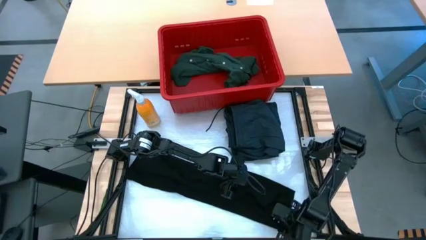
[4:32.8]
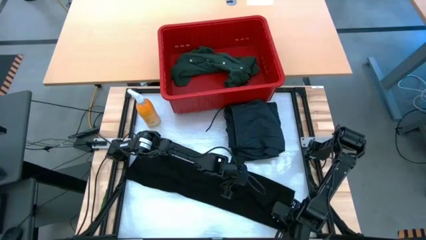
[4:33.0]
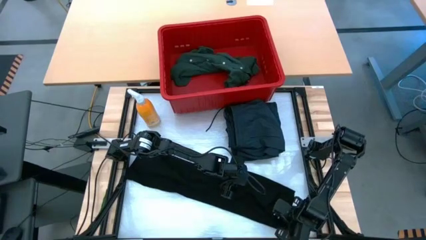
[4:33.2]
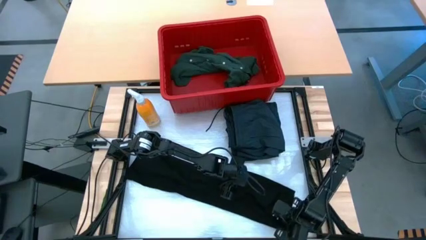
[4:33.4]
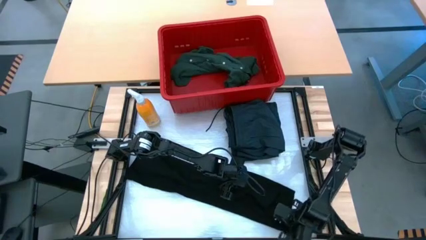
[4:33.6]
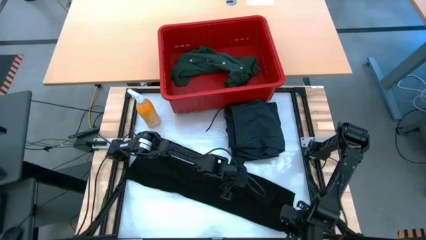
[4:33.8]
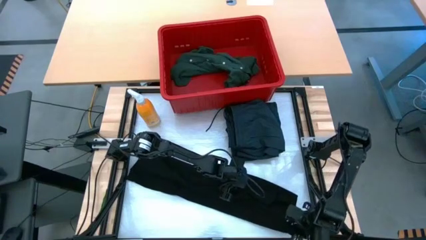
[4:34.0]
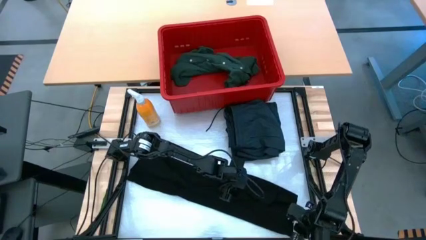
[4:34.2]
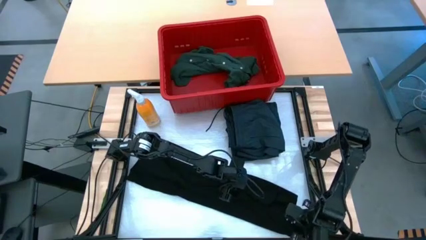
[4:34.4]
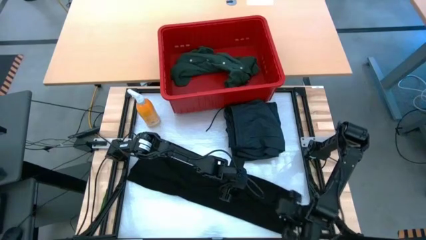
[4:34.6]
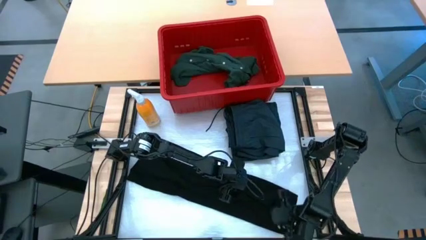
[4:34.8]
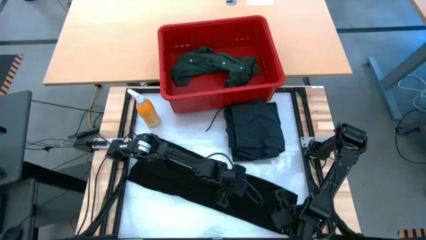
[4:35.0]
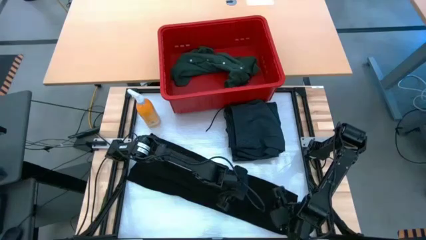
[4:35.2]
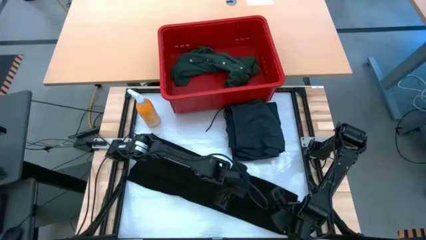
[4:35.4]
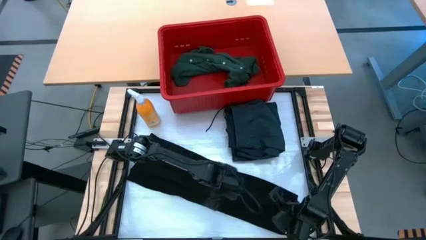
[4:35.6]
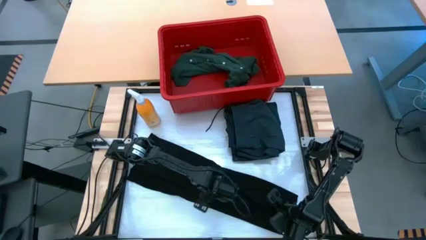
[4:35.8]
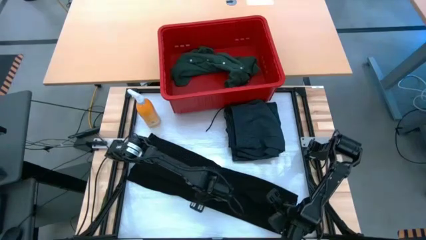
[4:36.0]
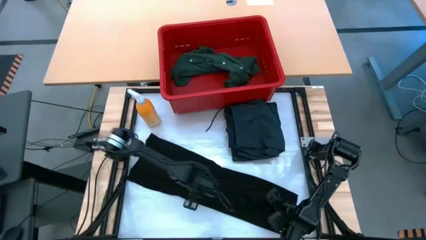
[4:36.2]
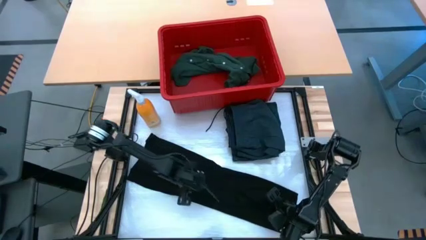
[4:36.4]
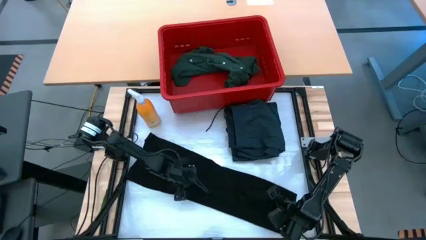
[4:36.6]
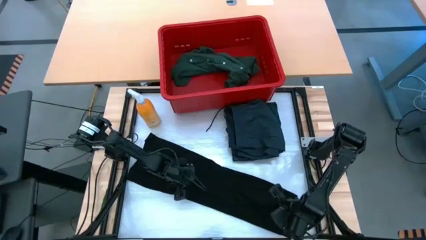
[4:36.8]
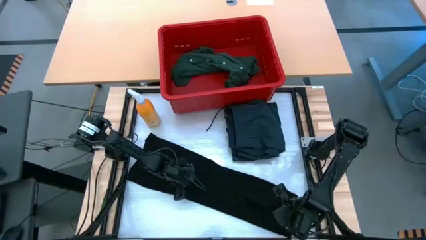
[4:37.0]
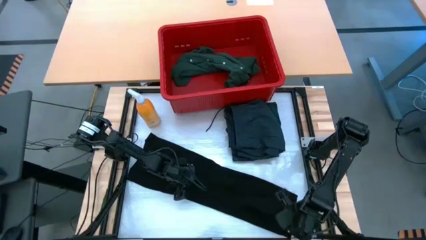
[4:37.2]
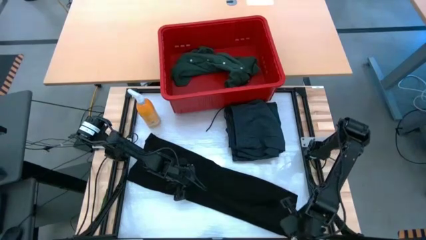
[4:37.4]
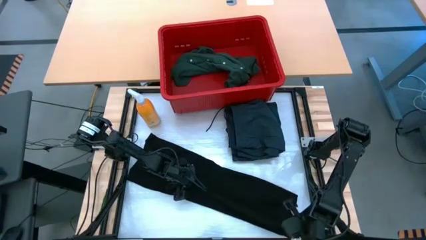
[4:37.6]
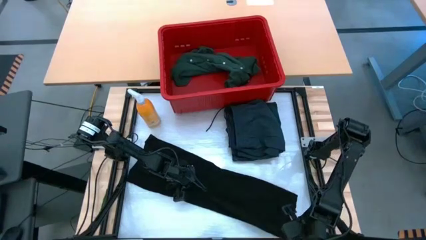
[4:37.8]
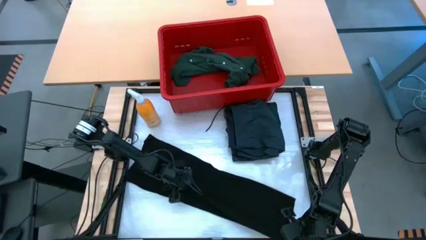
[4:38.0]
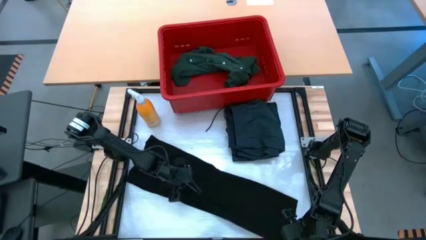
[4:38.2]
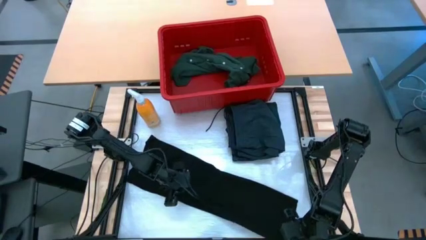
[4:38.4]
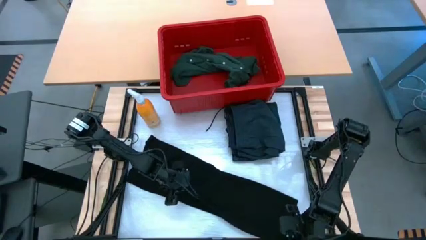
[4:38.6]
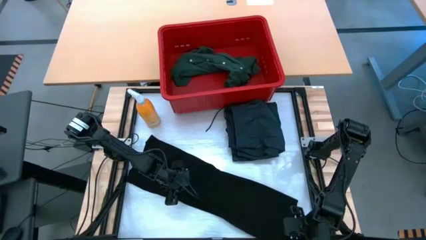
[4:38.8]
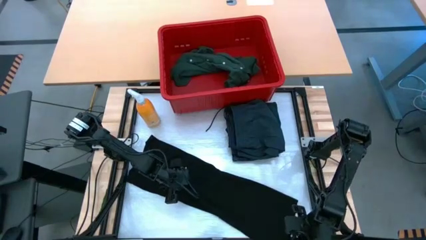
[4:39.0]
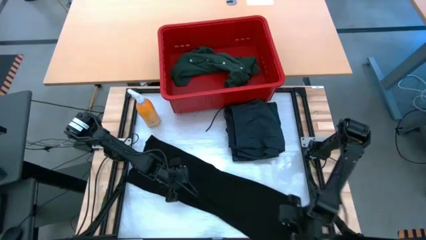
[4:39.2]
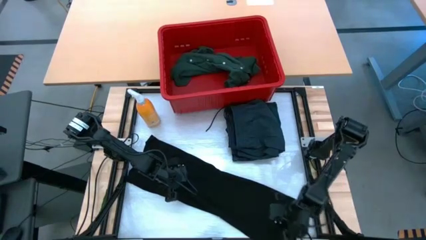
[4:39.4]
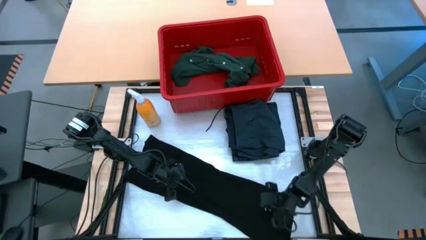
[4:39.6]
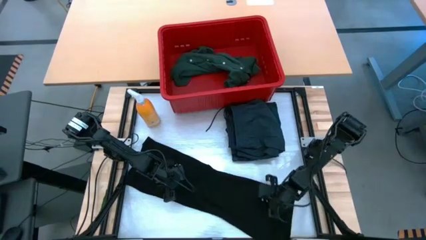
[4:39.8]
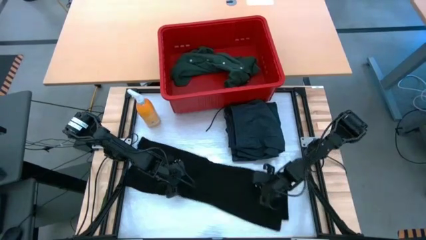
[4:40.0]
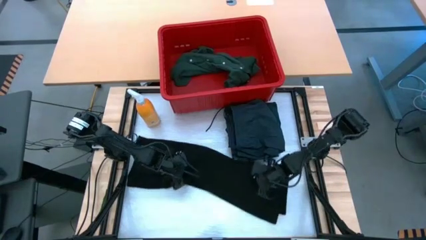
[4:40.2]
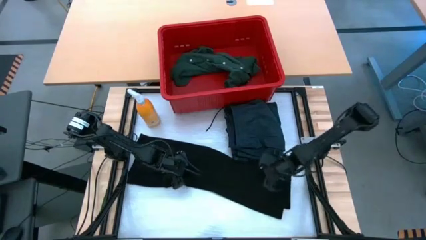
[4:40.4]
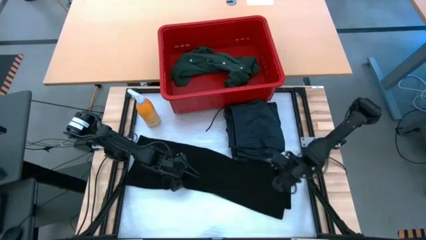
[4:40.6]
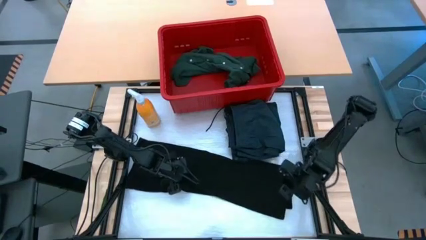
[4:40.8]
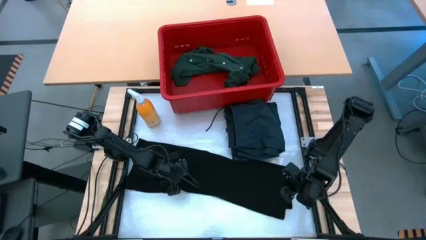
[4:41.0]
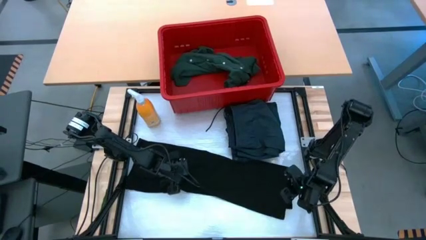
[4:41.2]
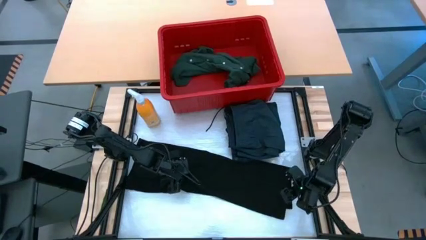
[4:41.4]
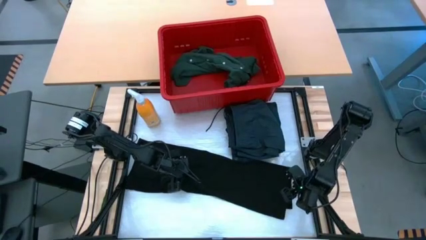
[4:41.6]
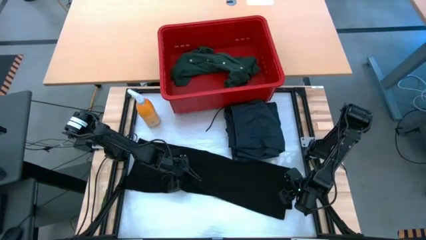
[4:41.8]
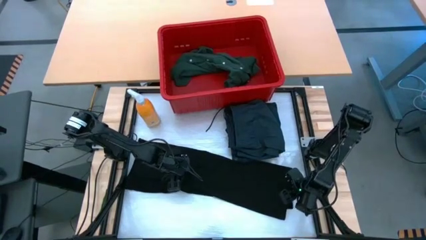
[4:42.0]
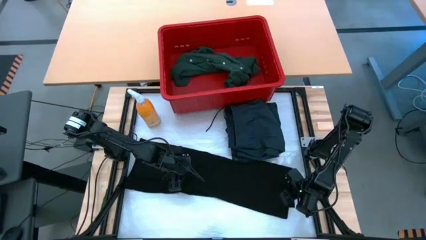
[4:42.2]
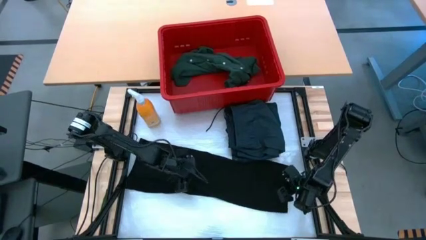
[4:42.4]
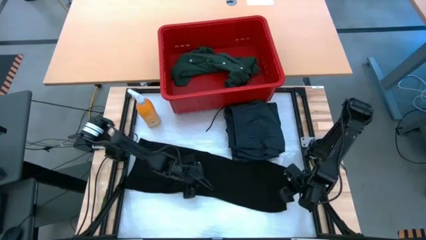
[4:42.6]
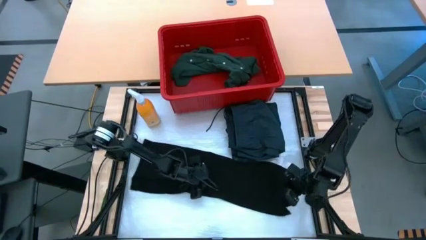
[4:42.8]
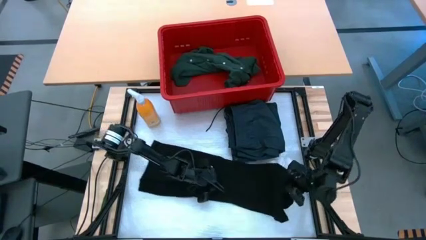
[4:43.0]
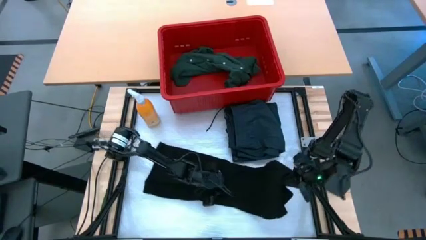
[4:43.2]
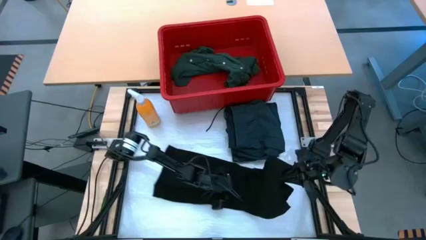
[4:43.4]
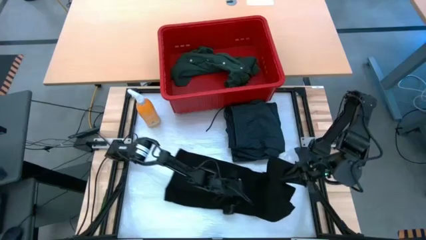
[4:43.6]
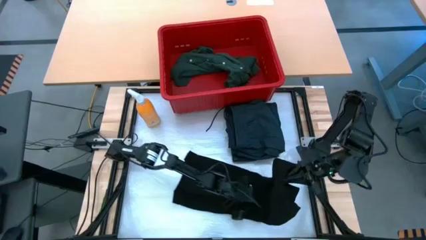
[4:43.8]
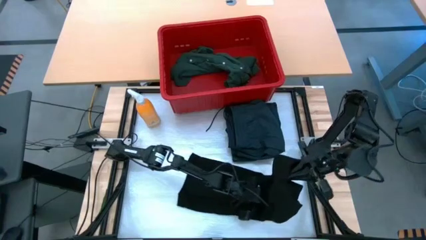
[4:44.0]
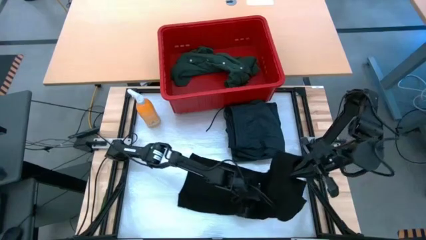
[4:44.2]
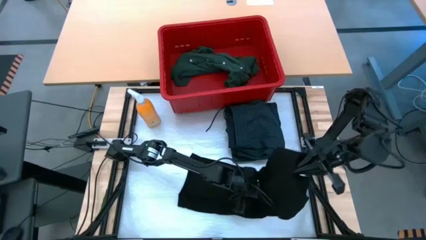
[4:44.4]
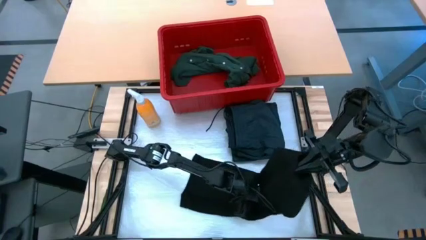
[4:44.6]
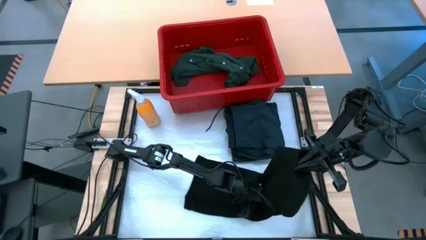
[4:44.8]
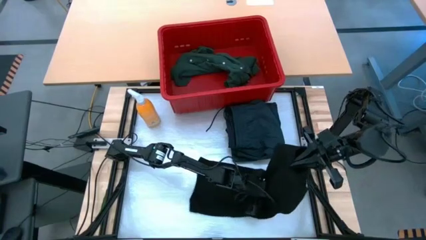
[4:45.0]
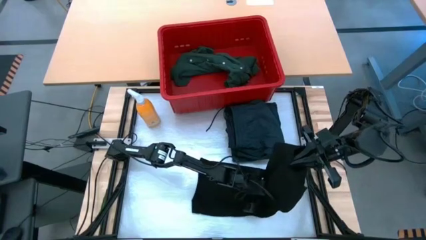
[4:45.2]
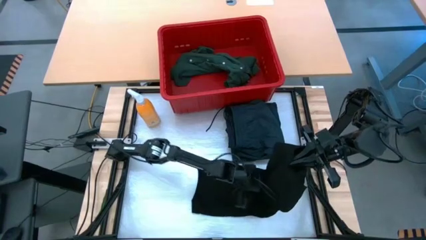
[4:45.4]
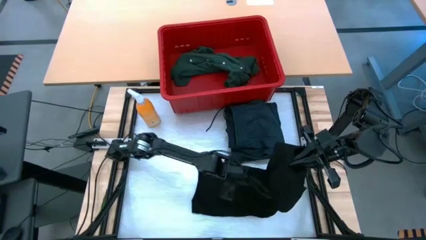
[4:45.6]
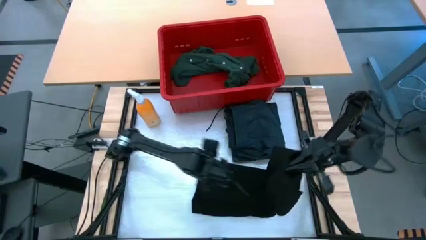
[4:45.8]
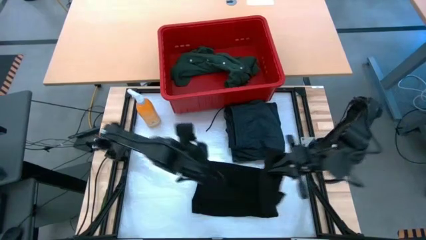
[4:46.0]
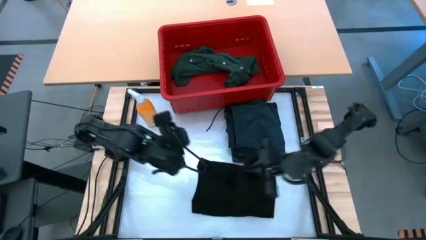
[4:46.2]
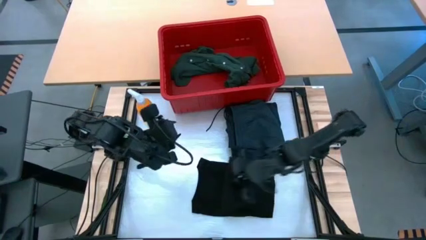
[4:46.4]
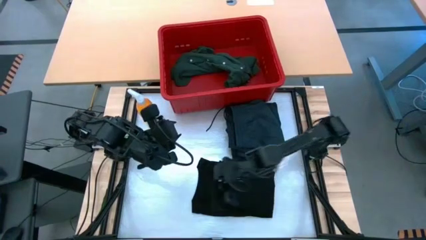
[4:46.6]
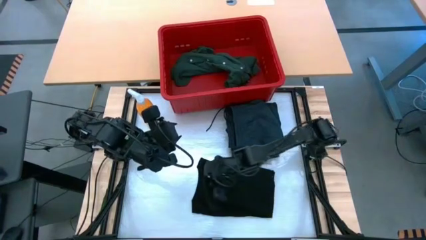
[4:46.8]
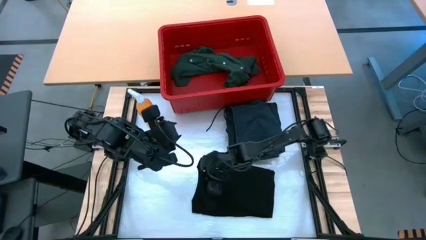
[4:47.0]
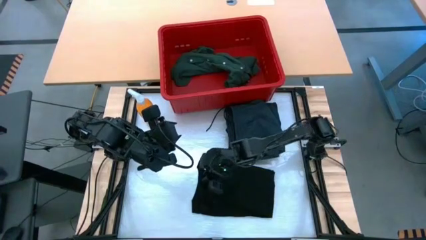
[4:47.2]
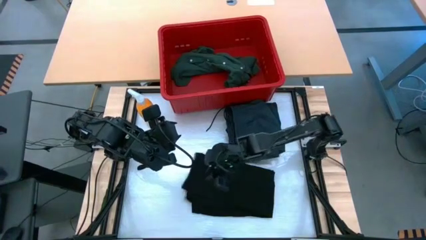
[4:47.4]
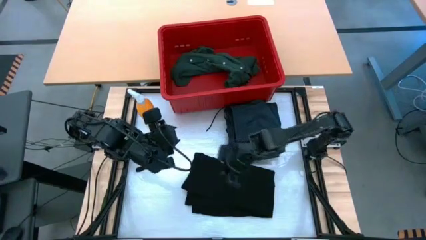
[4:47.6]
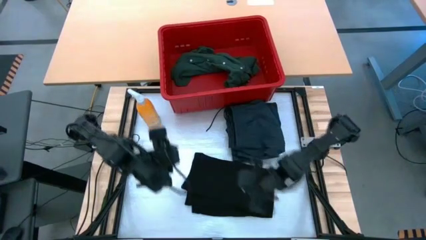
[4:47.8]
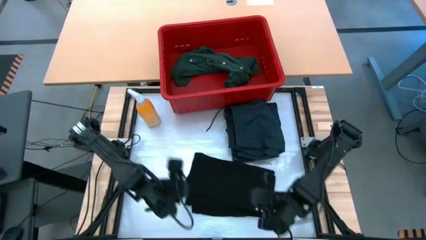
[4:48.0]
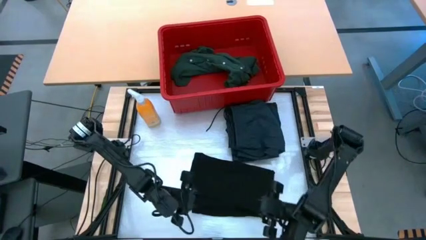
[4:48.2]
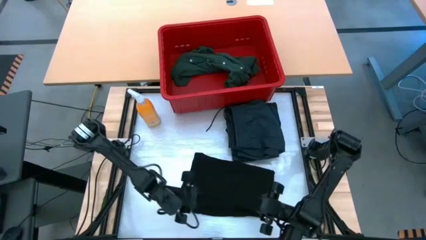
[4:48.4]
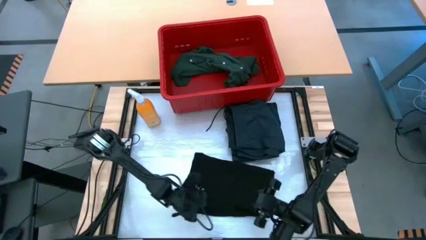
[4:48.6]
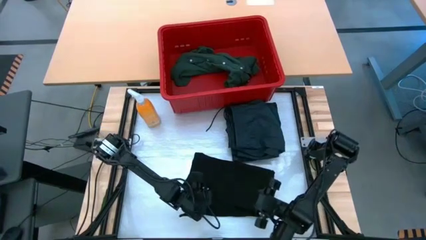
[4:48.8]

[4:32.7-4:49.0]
Task: Fold Laundry from Bin
Fold the black shirt
